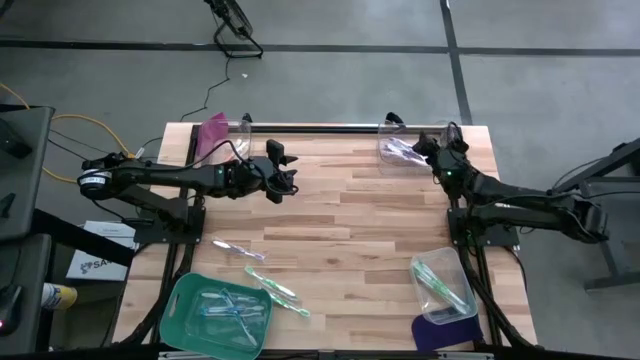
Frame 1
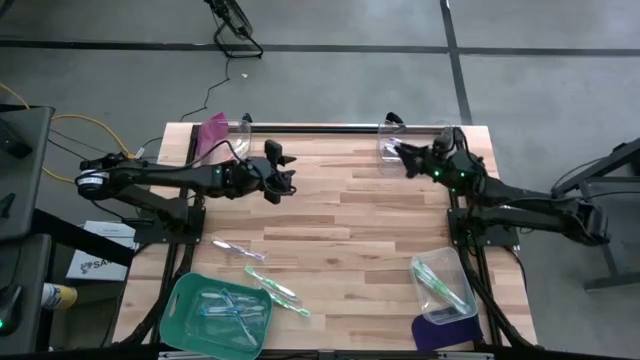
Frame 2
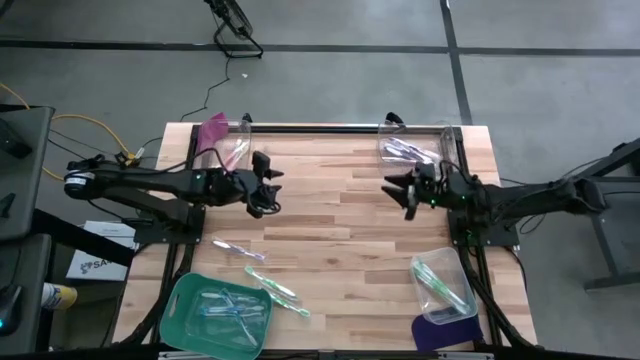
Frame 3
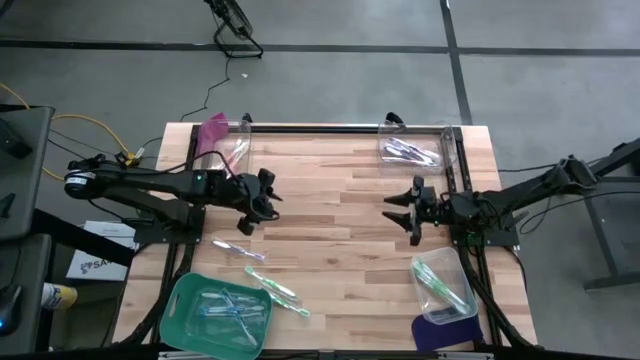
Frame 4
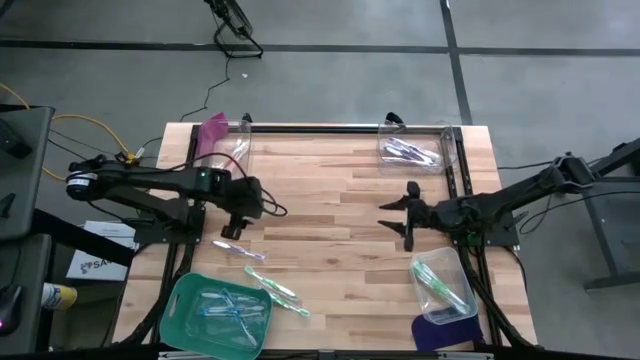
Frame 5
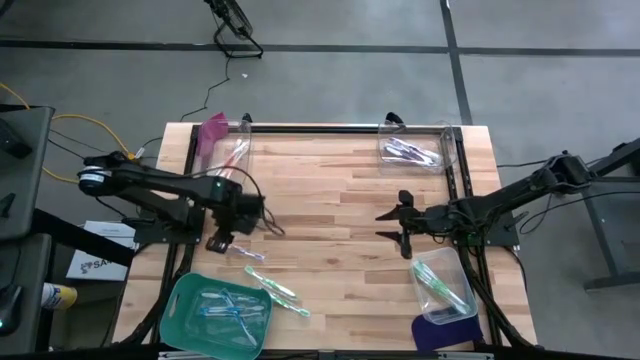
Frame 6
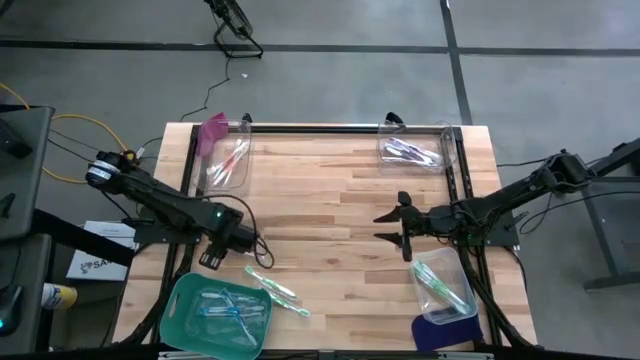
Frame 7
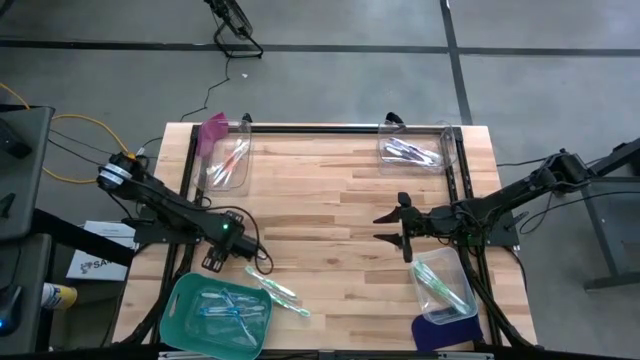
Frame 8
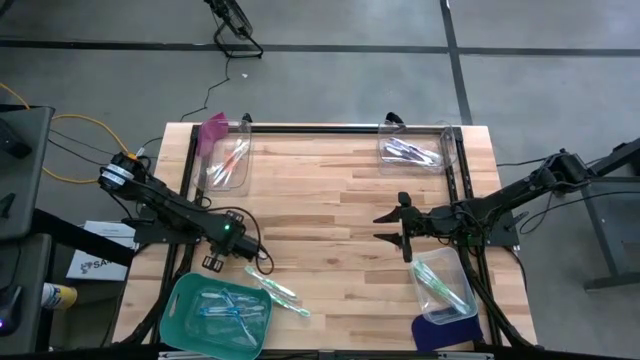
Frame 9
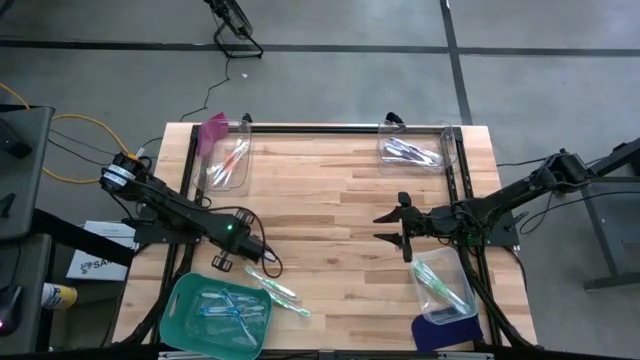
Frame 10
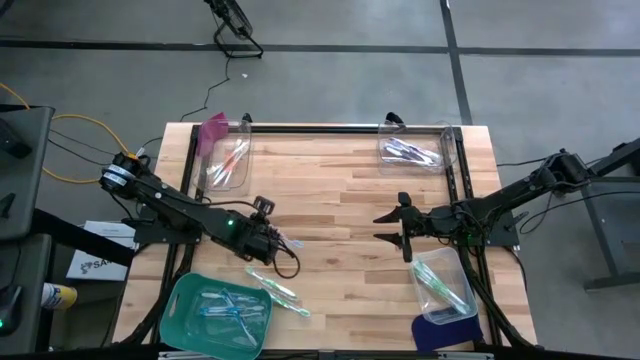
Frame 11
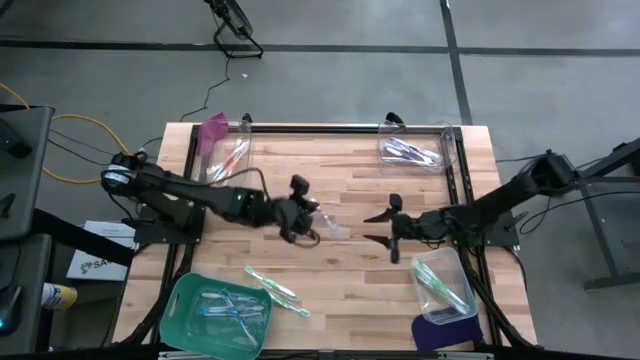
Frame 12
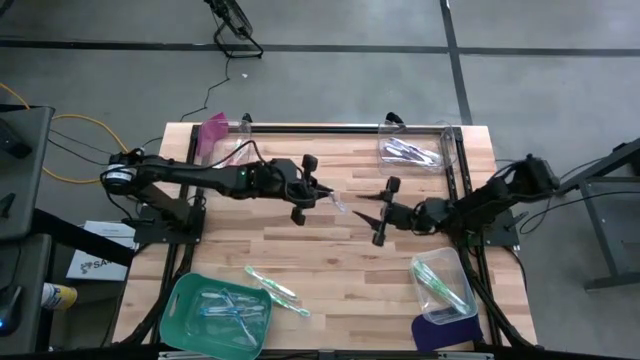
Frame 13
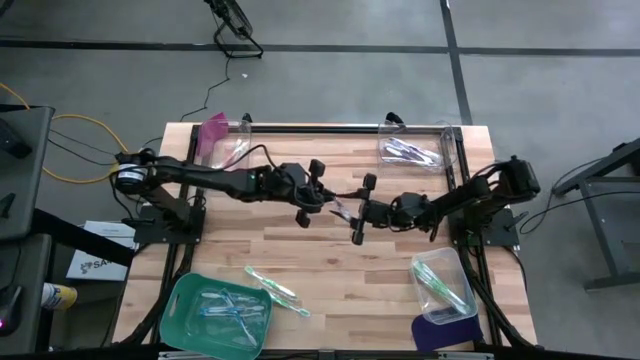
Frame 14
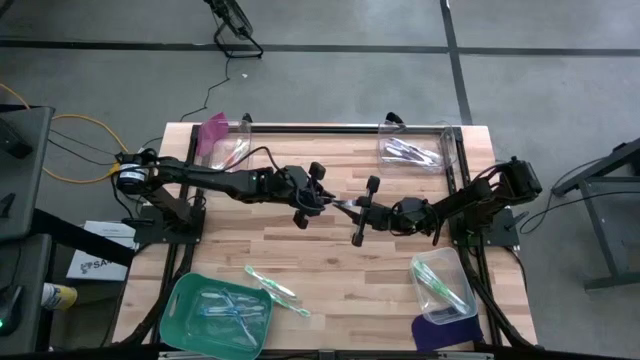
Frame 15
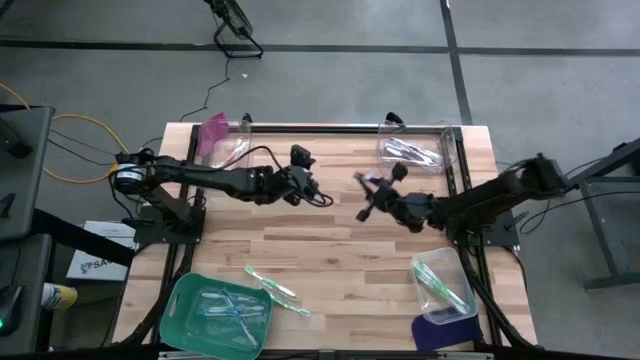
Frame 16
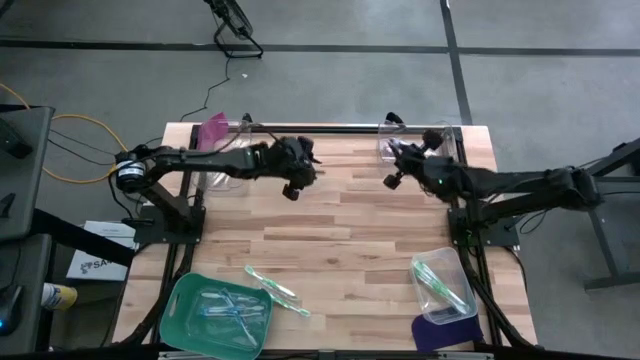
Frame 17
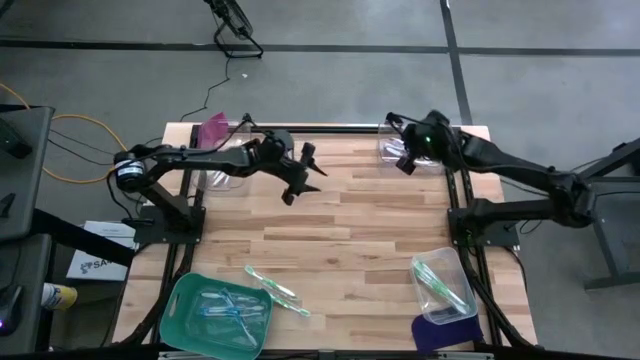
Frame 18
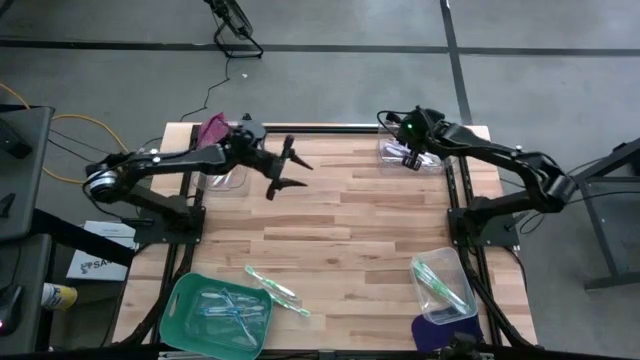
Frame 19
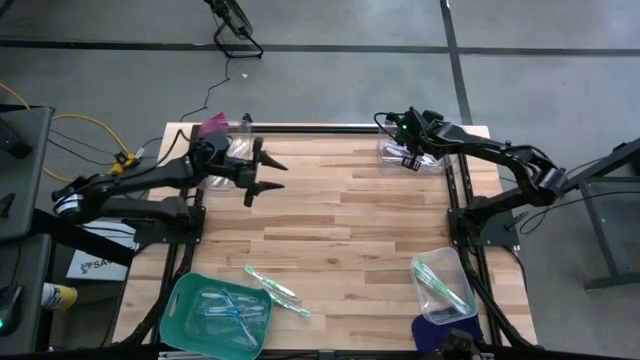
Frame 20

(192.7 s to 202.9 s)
Task: Pick & Place Toothbrushes
Put the purple toothbrush into the right transparent bin

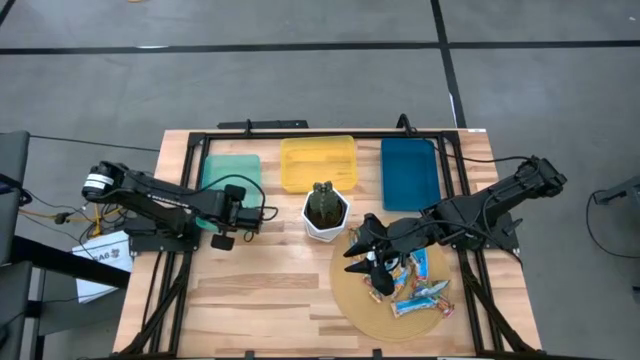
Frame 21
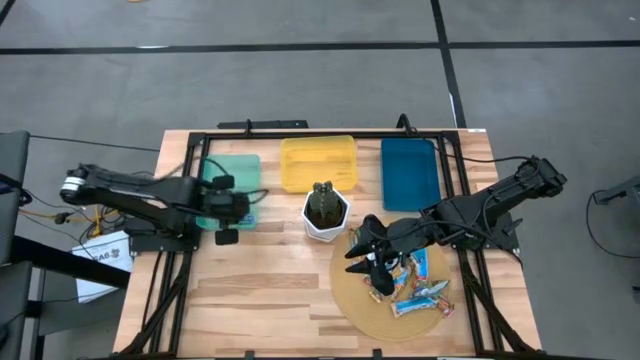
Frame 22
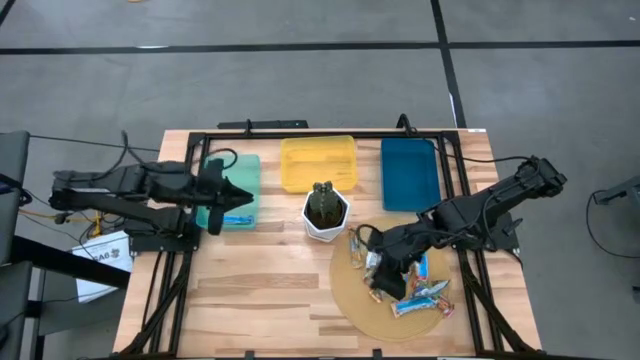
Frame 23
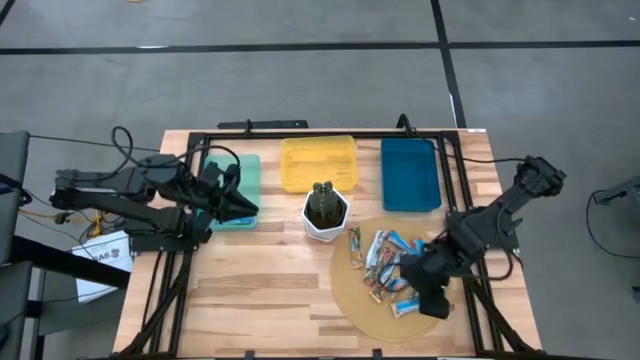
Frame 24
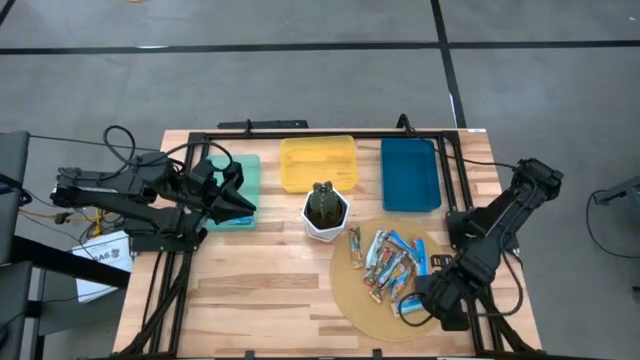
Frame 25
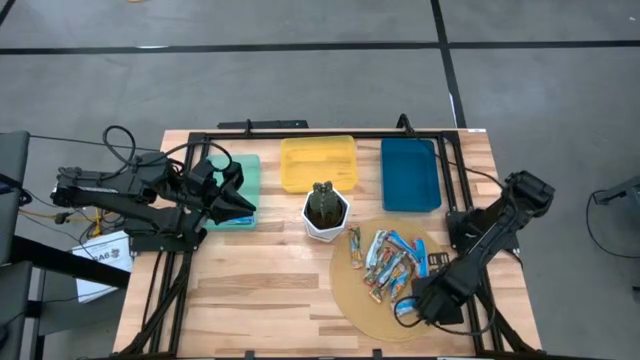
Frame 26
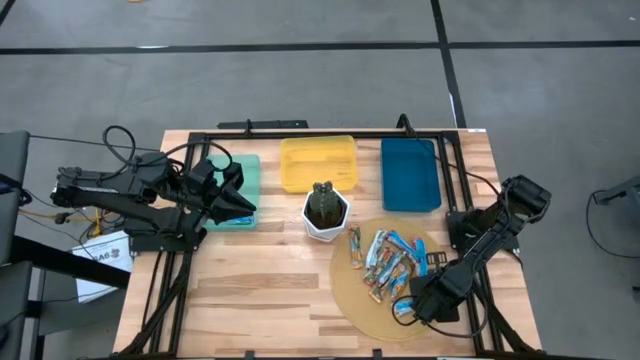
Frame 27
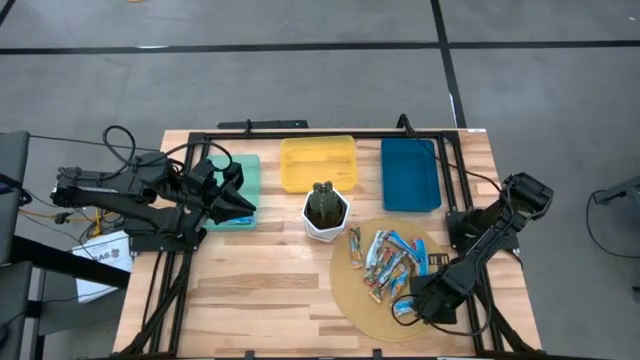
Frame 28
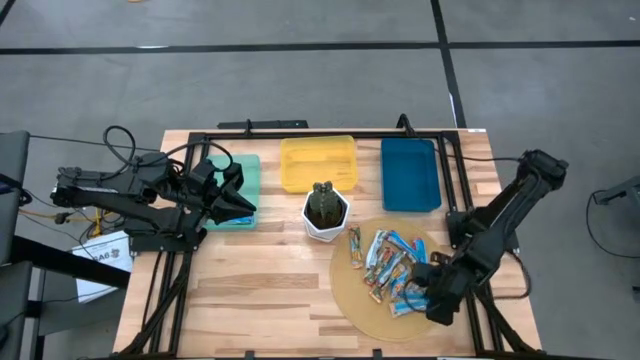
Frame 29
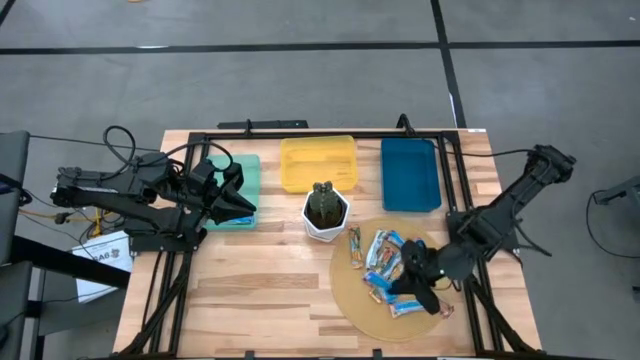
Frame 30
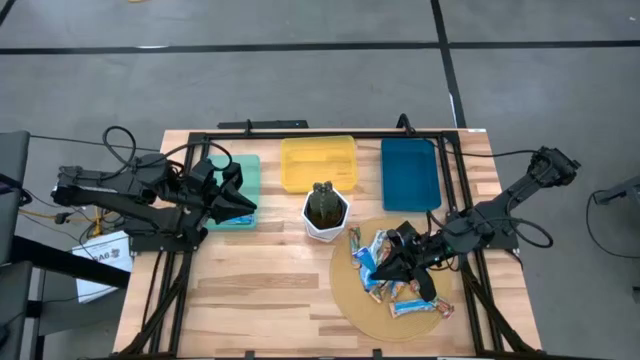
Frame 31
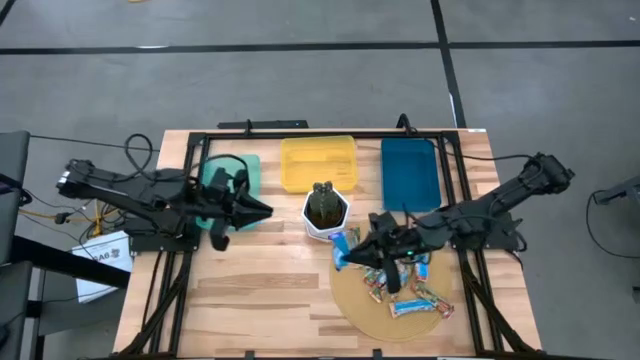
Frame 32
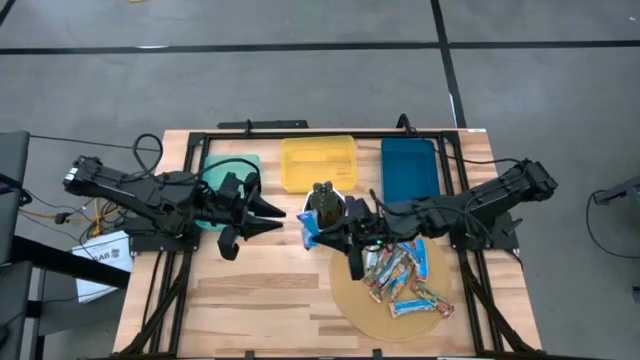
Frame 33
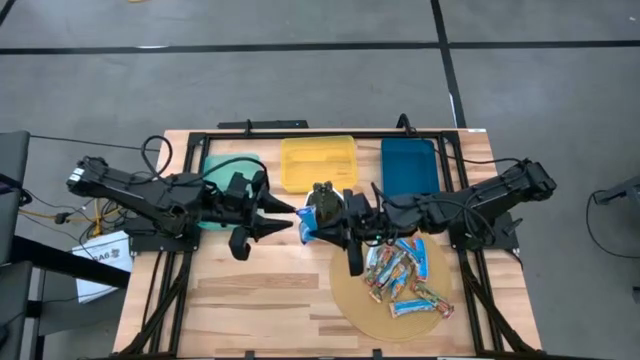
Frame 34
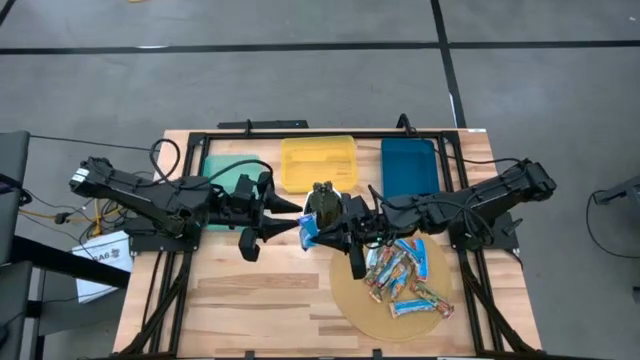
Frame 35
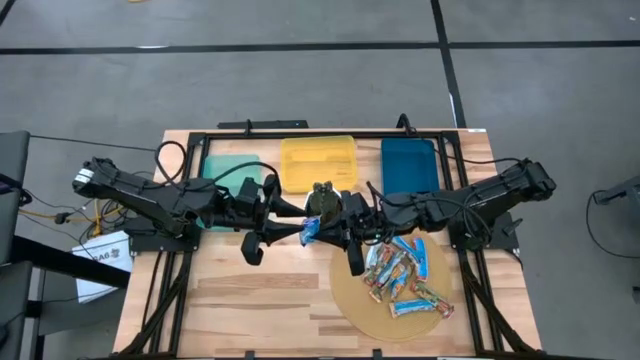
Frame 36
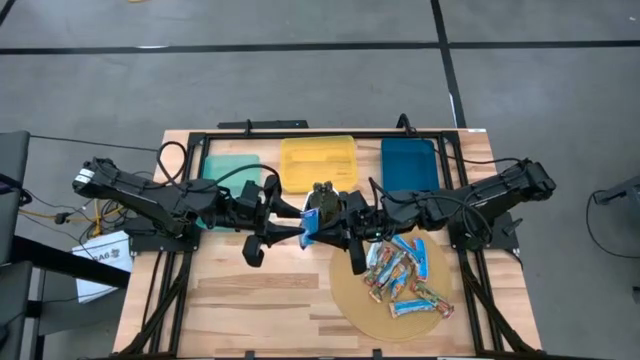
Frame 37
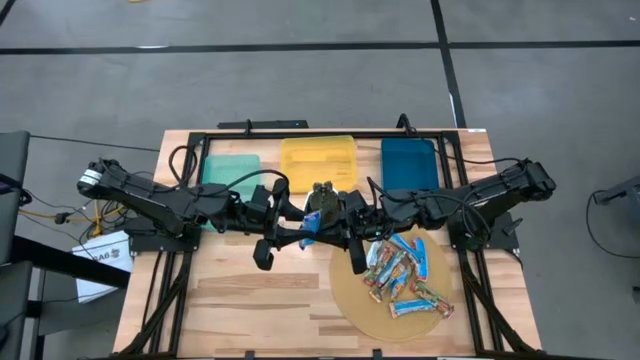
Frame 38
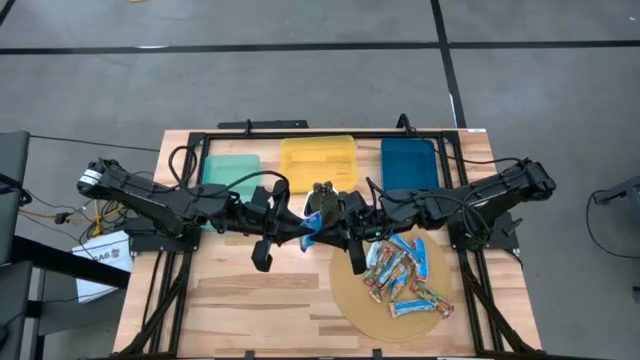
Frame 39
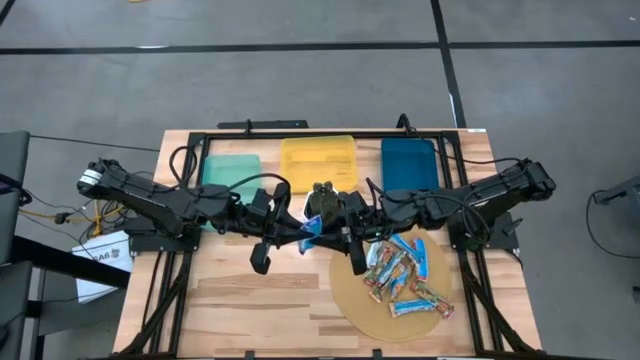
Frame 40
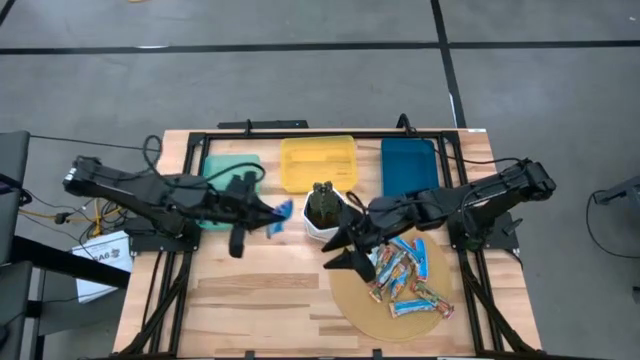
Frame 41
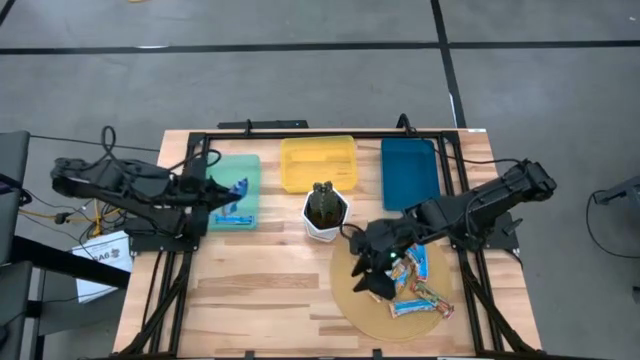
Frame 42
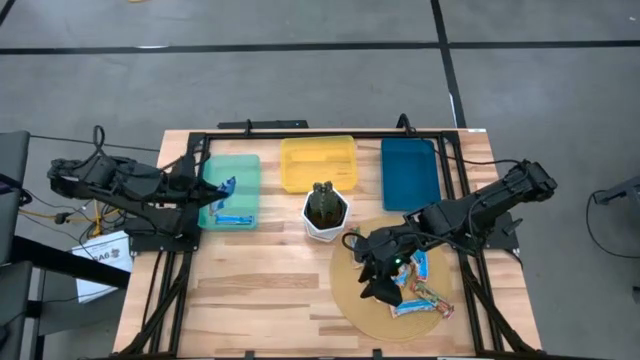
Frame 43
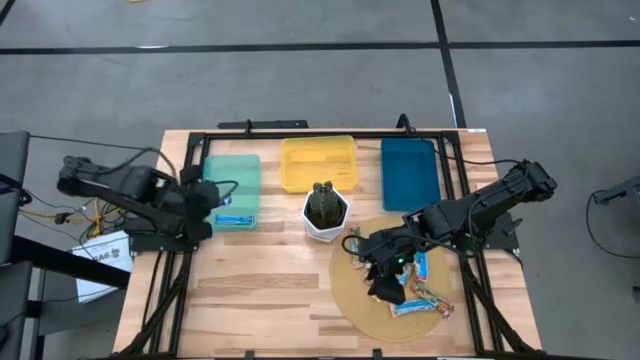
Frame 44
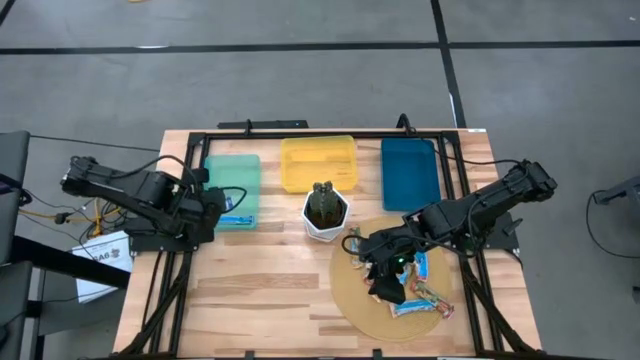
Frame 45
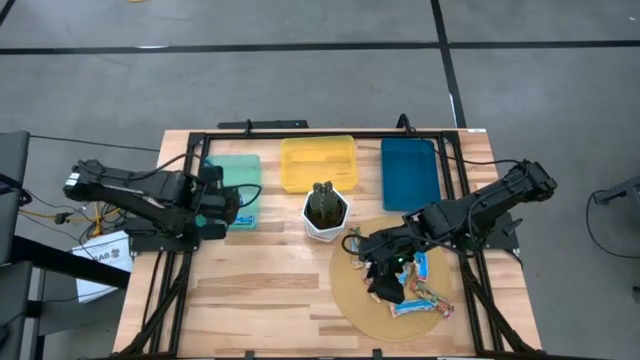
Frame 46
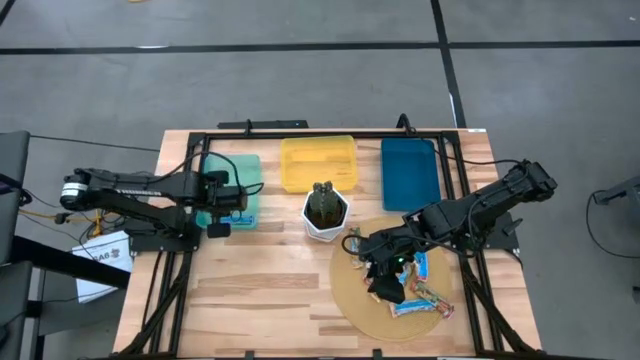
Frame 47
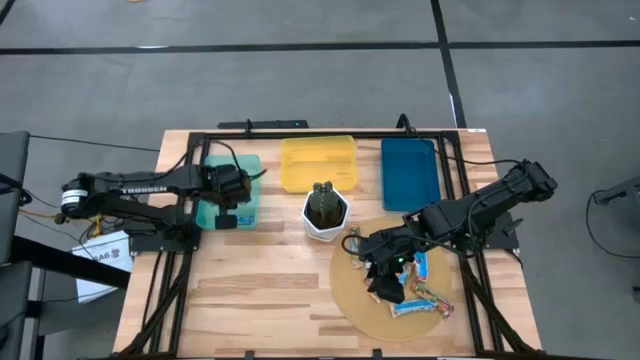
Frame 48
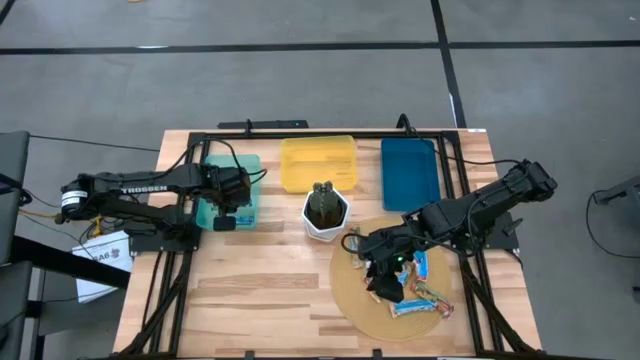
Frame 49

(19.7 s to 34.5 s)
Task: Pick and place Granola Bars by type
Put the blue granola bar into the green bin
